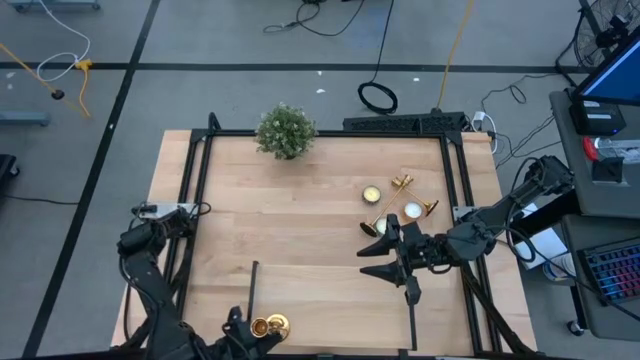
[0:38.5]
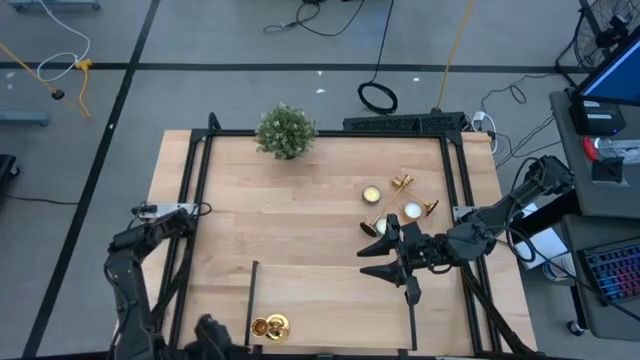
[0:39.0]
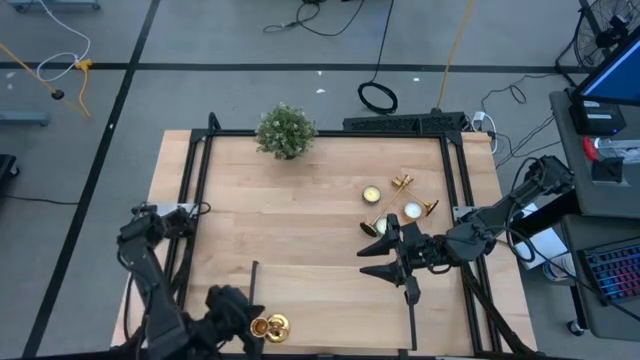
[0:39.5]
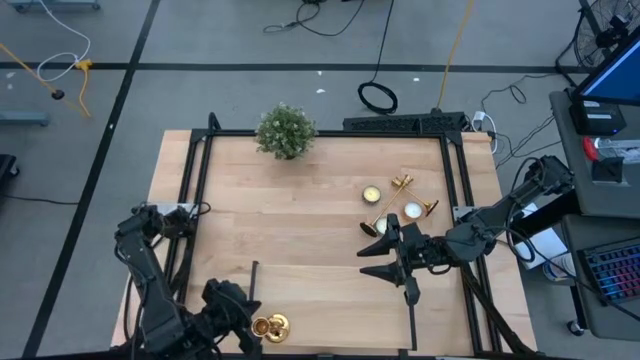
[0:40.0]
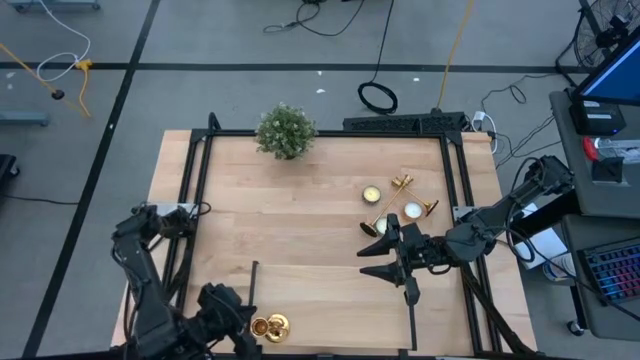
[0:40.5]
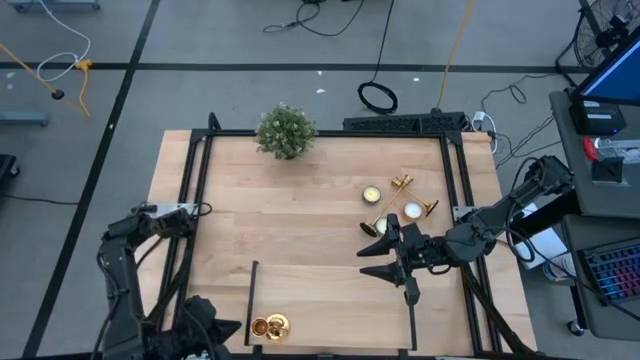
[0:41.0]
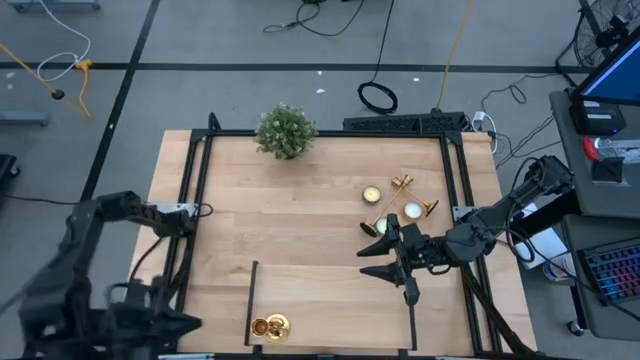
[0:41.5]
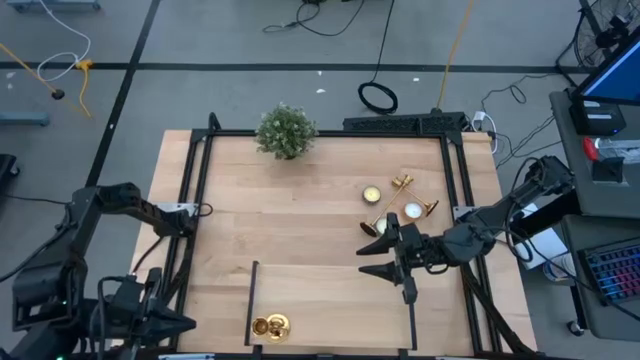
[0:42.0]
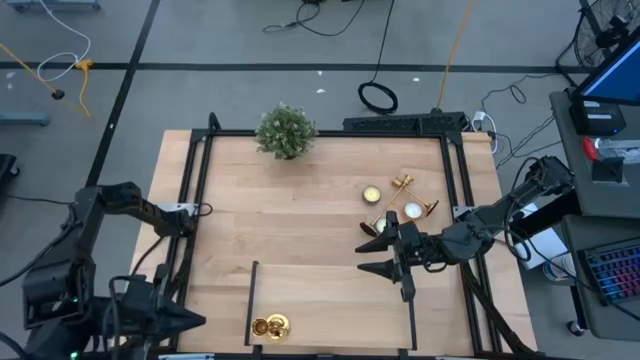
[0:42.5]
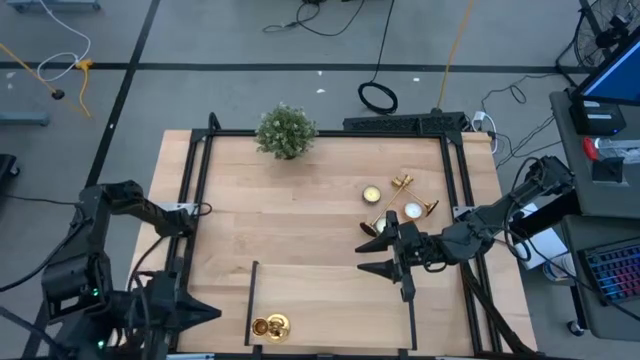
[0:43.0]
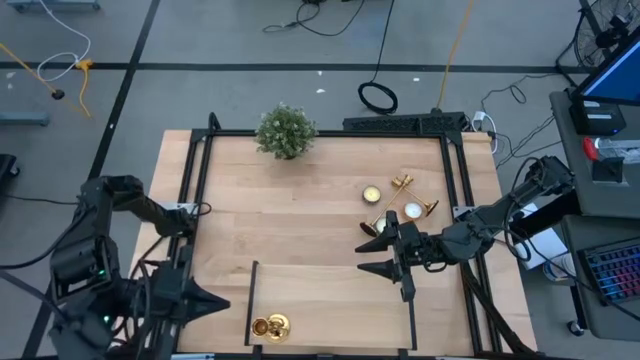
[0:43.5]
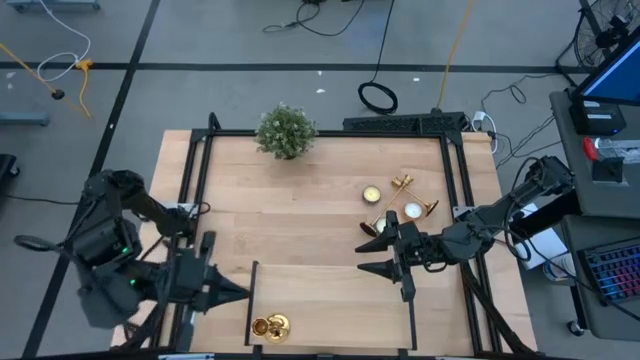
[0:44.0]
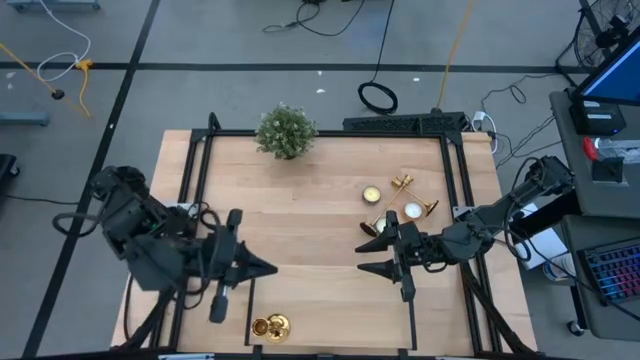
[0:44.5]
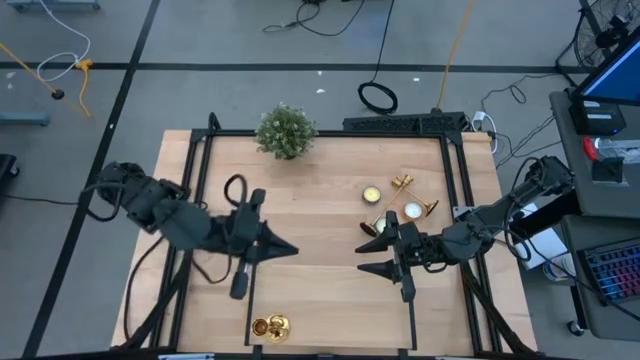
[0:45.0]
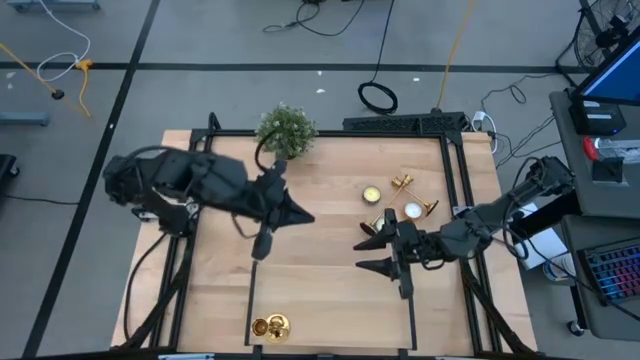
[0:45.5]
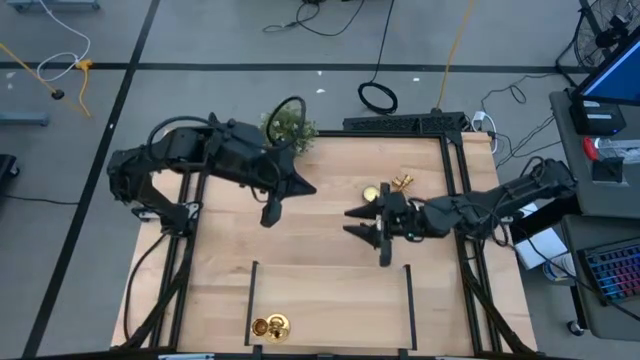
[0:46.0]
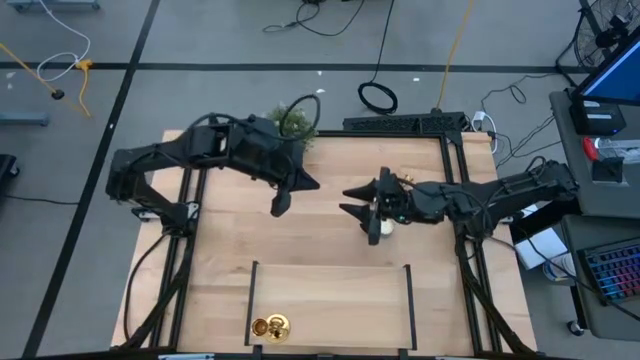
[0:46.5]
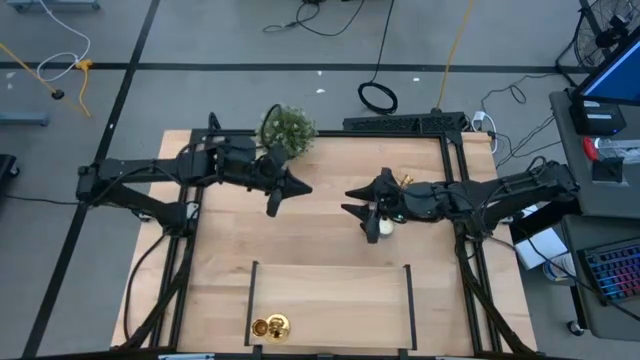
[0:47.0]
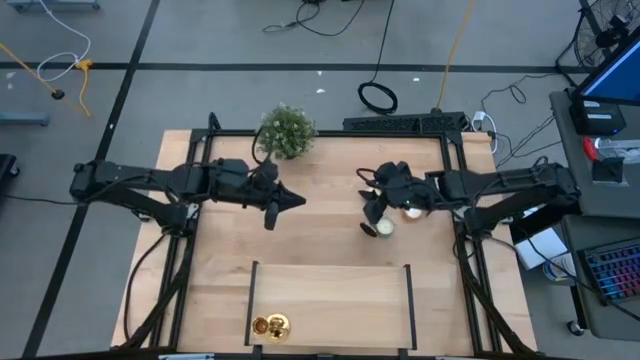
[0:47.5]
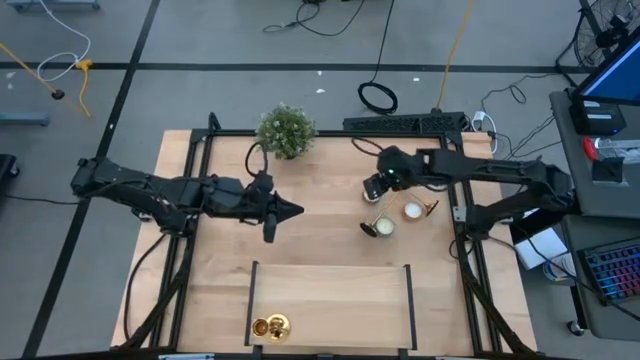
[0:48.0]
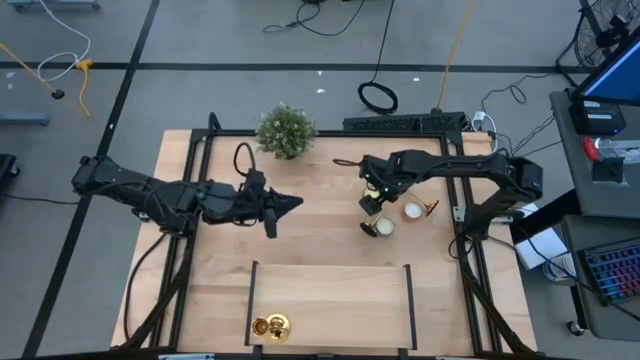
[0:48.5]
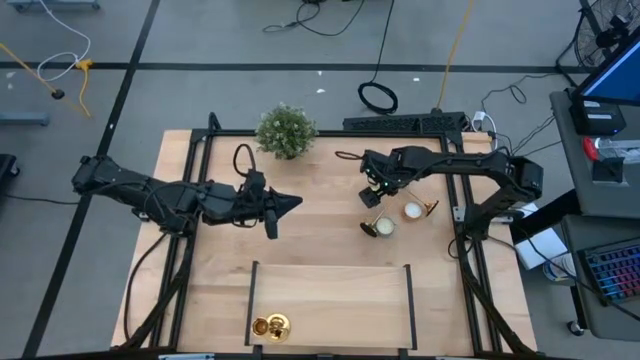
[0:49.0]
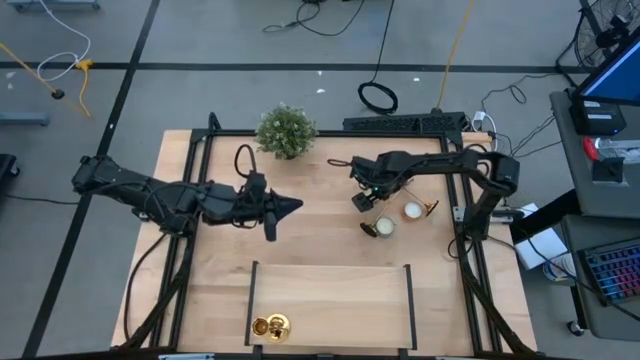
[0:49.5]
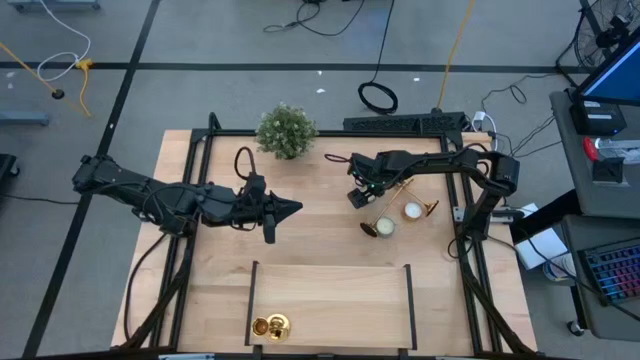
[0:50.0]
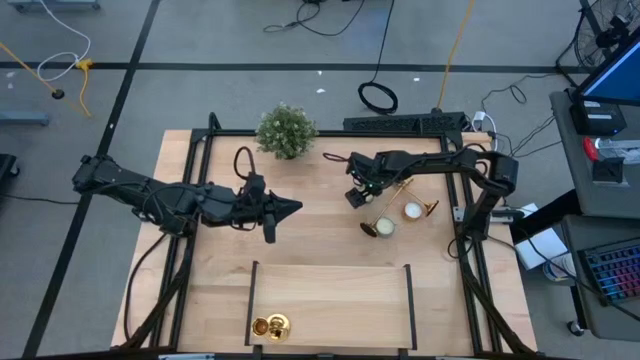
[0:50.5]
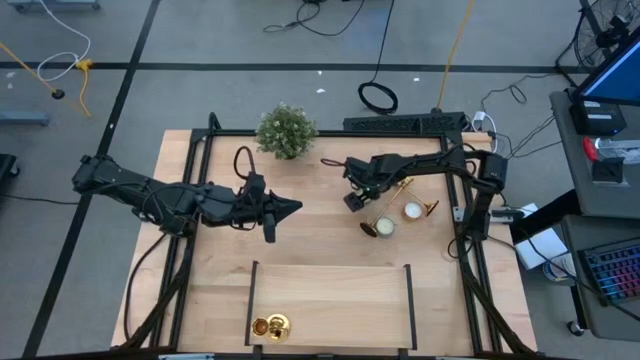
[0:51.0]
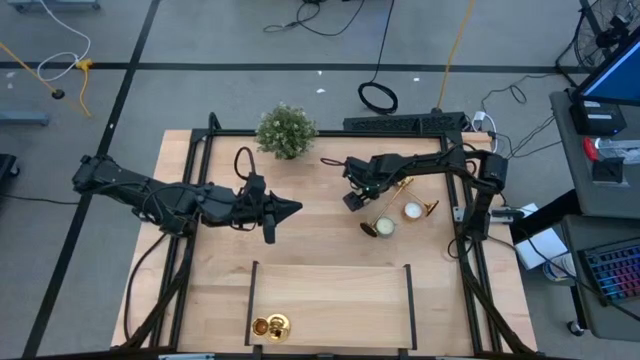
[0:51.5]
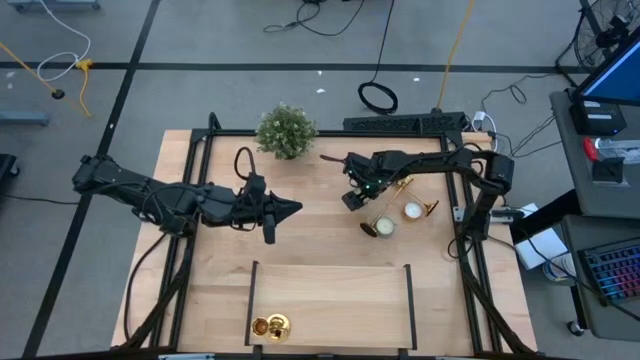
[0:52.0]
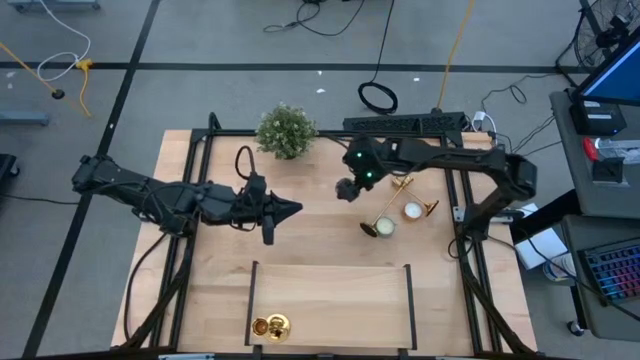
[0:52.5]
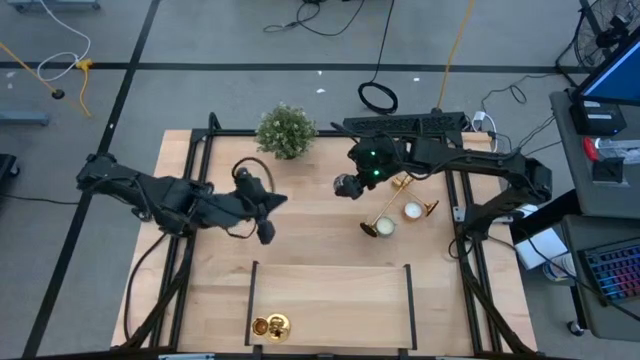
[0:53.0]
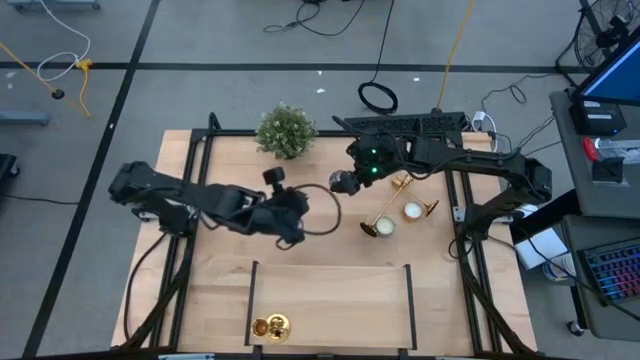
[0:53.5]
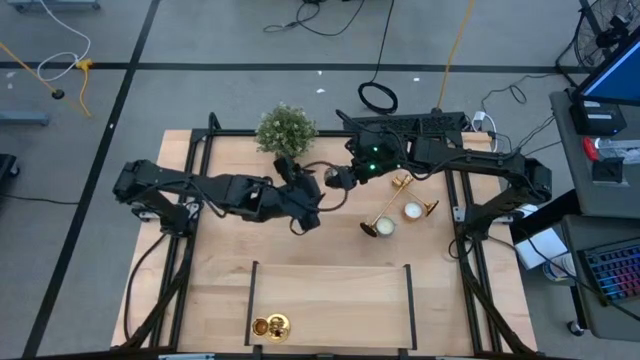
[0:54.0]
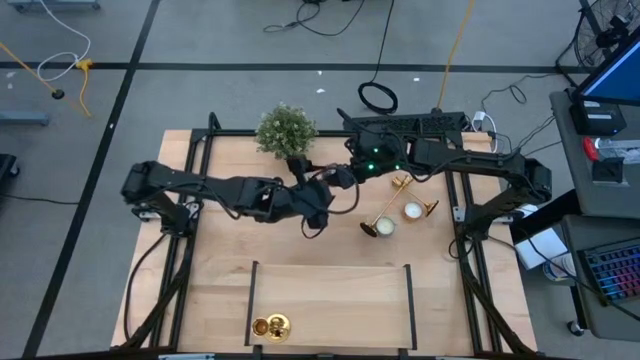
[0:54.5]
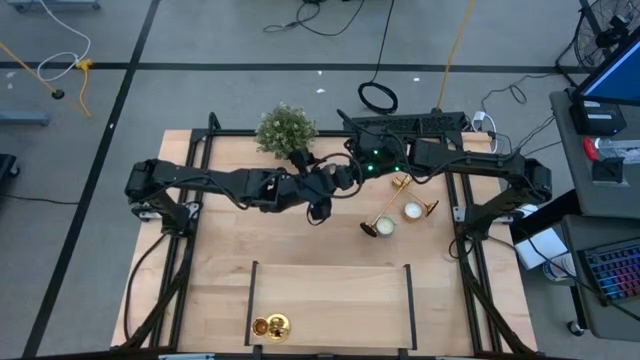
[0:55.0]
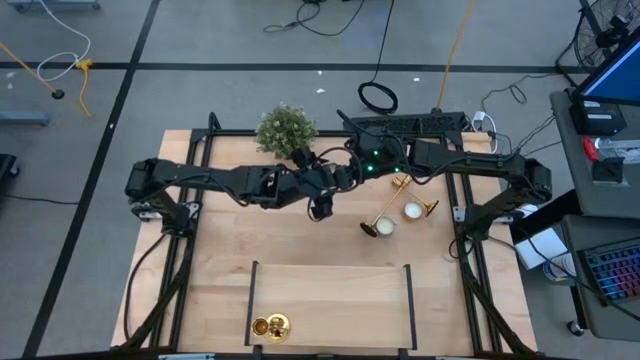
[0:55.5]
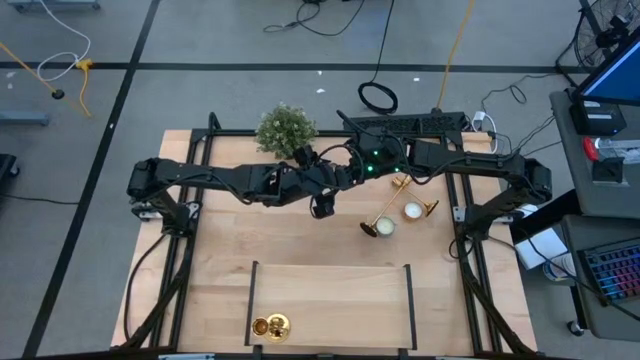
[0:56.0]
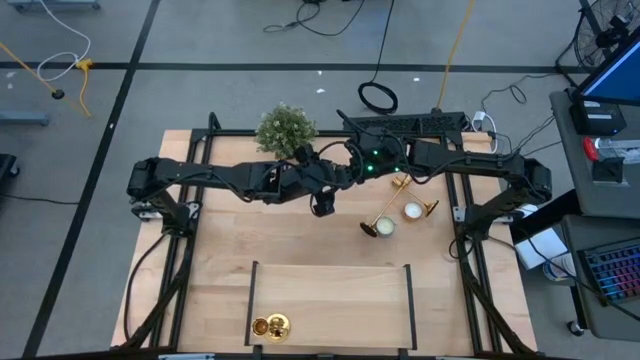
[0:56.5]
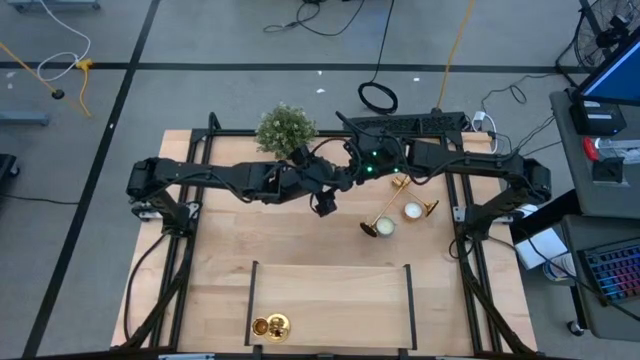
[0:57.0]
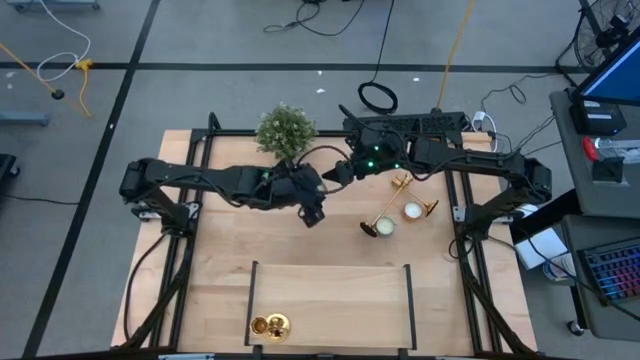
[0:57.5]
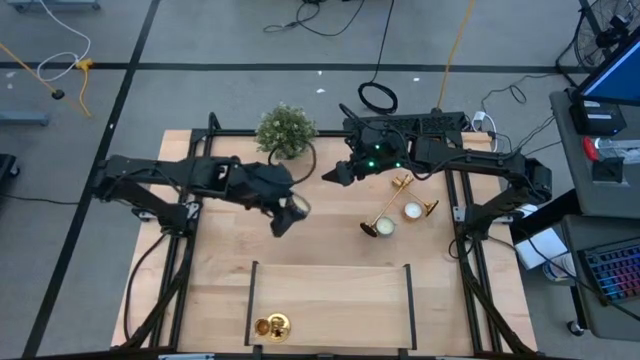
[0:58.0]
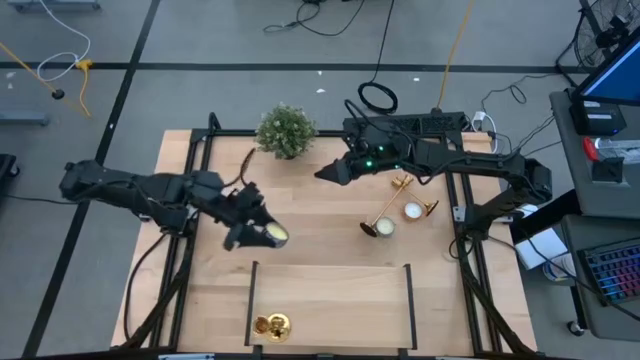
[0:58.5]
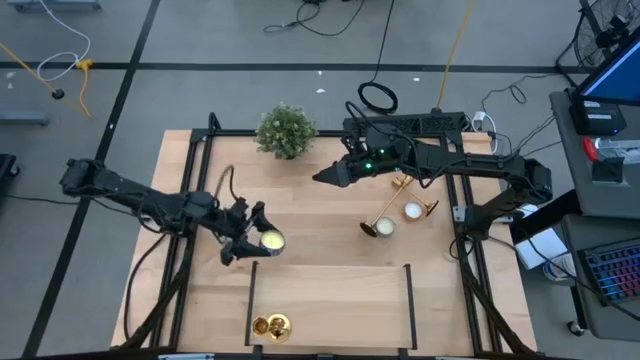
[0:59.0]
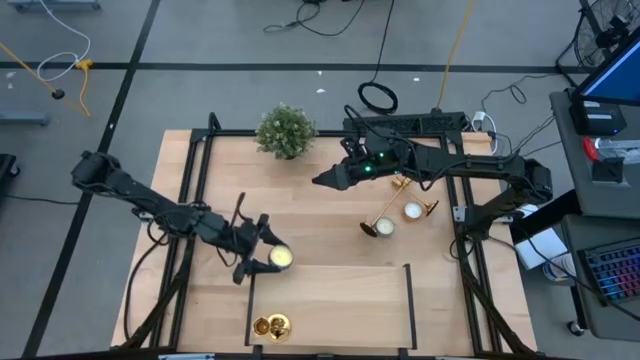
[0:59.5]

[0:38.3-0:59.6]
Task: Pick & Place candle stick holders
Put the black patterned scented candle on the shelf
